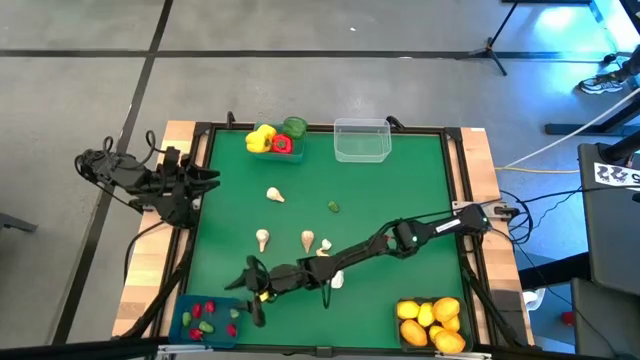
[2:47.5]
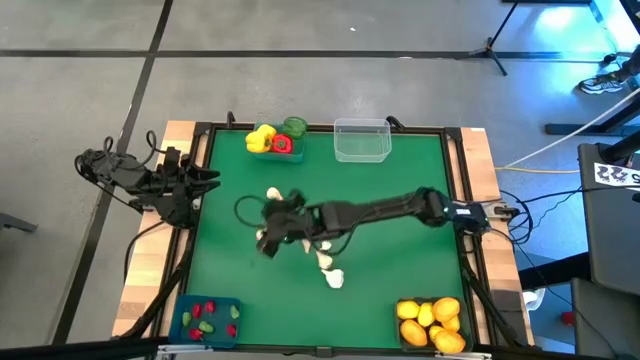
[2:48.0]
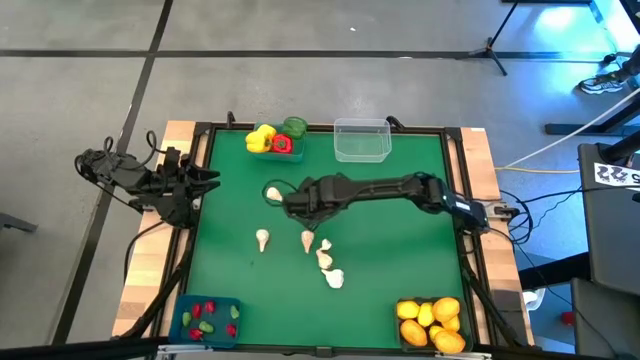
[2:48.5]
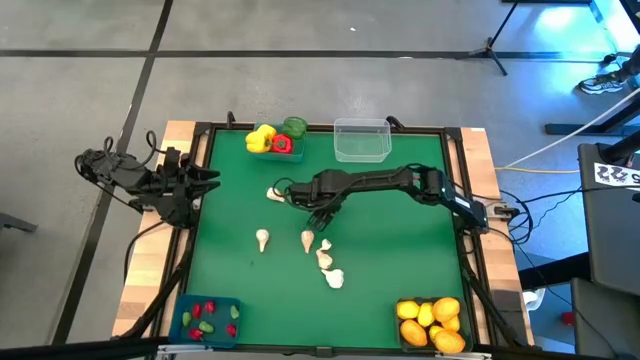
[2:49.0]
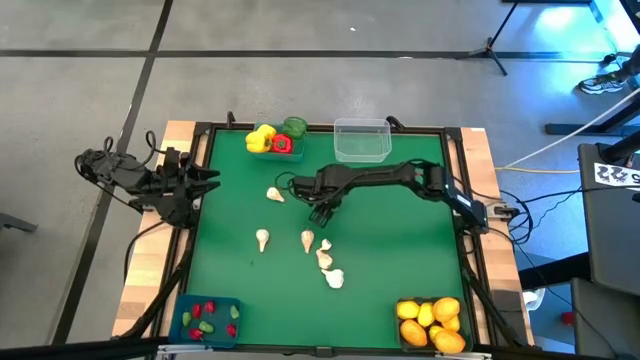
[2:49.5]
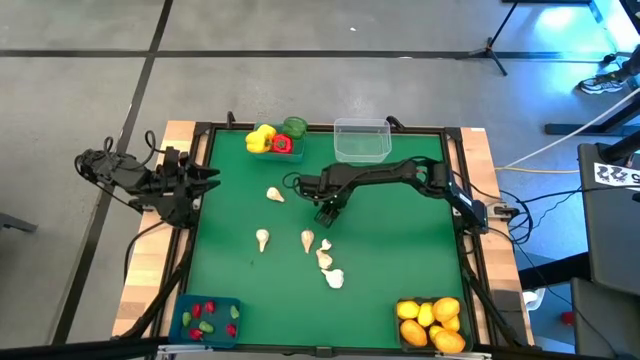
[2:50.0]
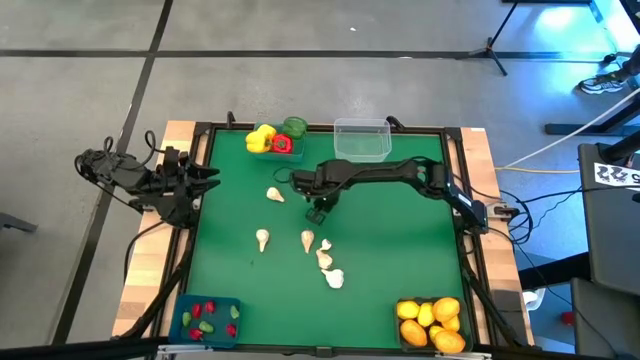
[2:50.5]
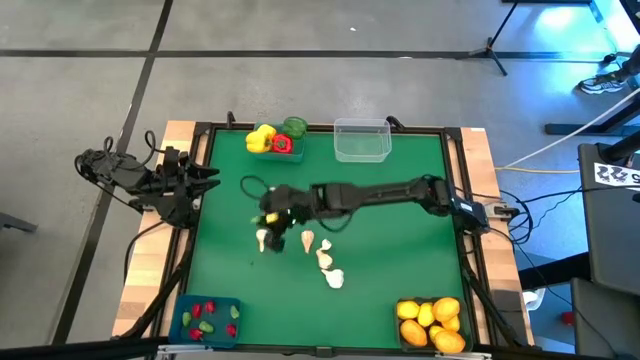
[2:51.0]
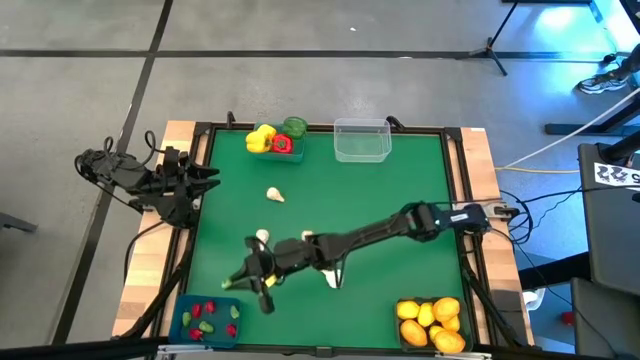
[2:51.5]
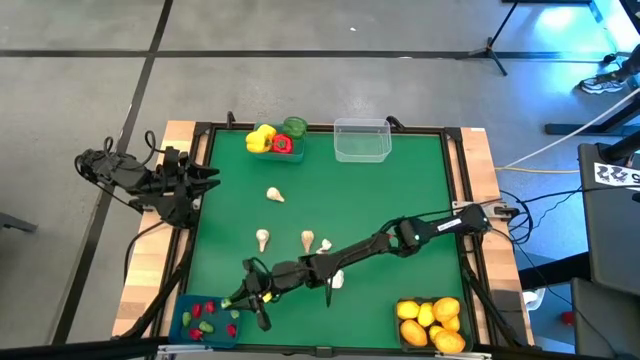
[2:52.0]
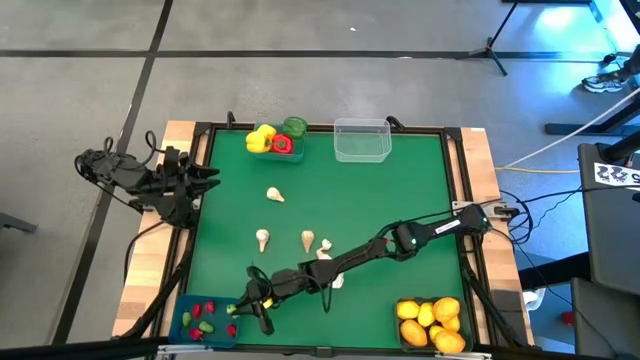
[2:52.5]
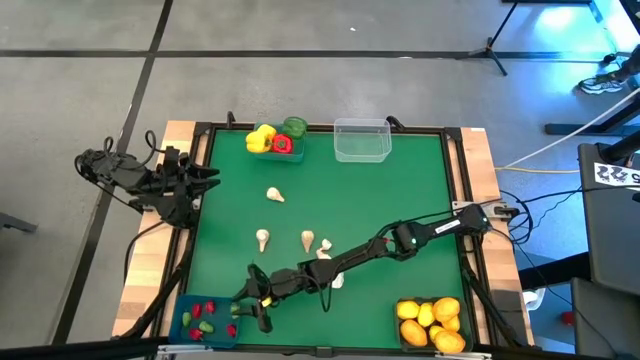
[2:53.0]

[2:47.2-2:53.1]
Task: Sort produce into baskets
Put the green chili pepper into the blue bin

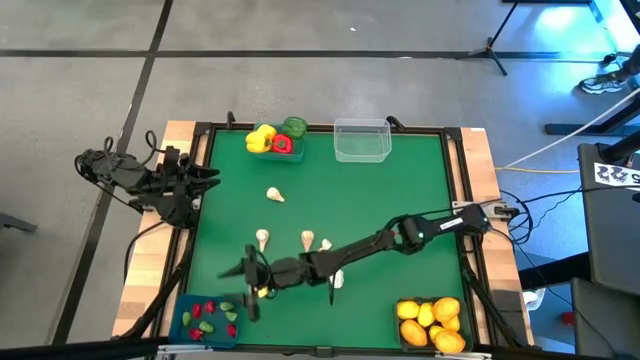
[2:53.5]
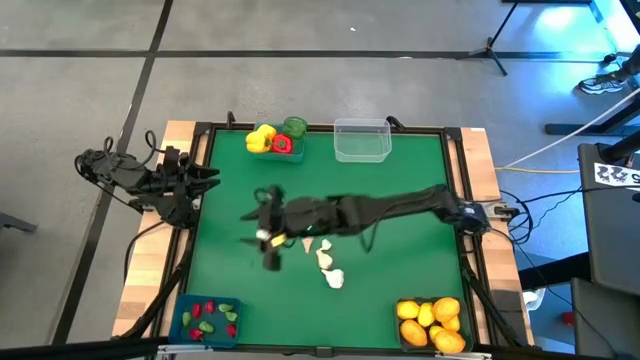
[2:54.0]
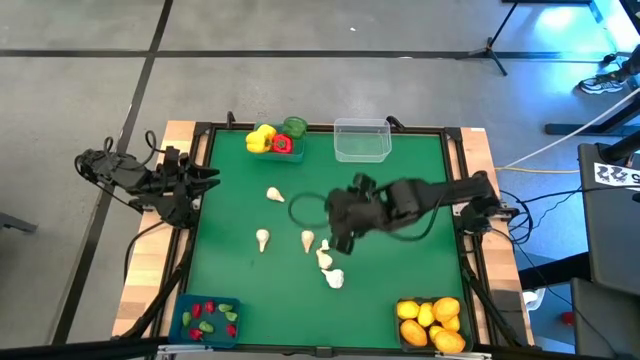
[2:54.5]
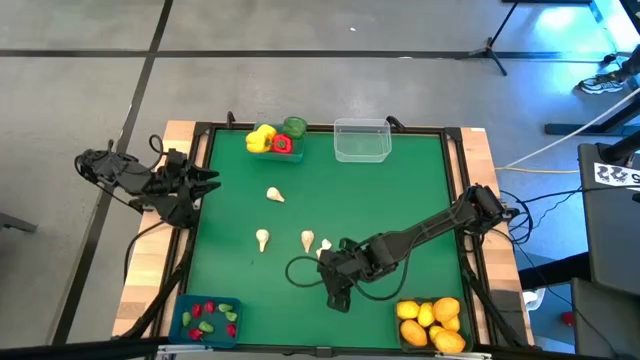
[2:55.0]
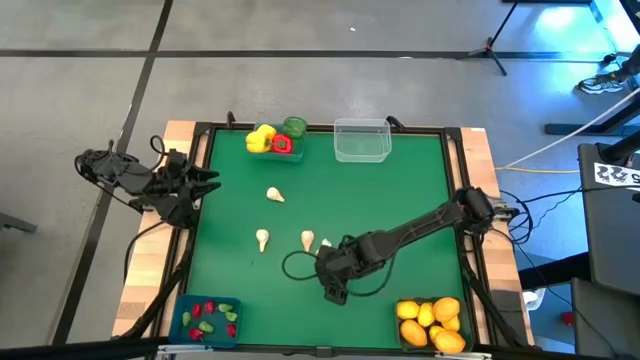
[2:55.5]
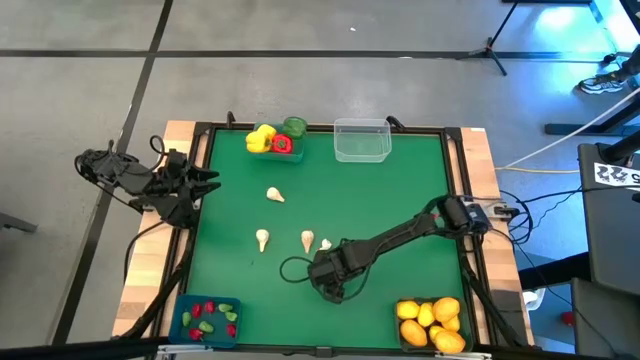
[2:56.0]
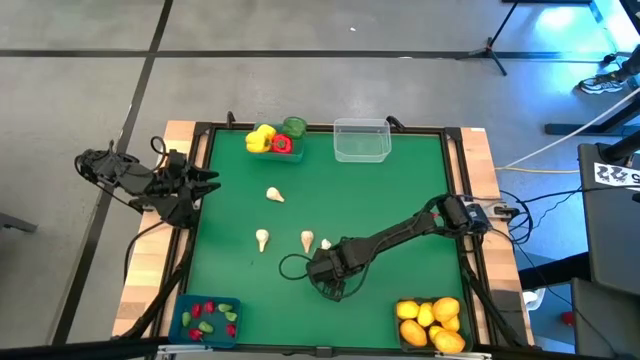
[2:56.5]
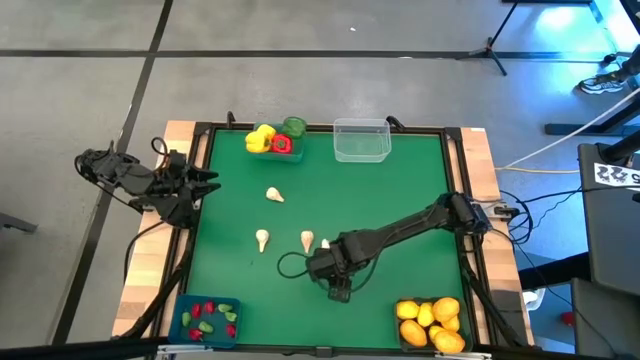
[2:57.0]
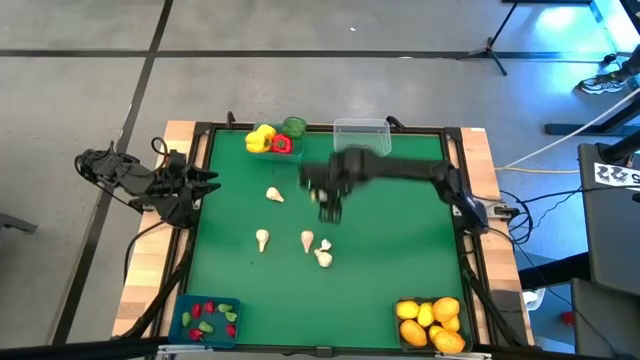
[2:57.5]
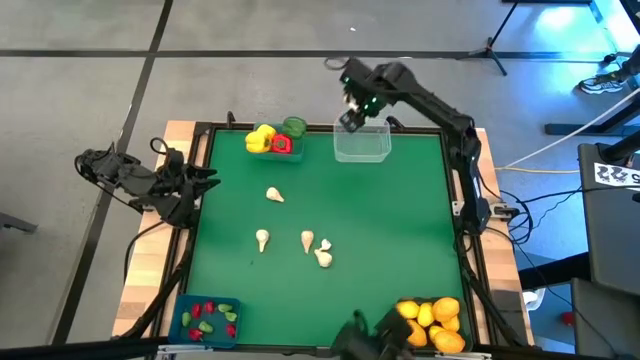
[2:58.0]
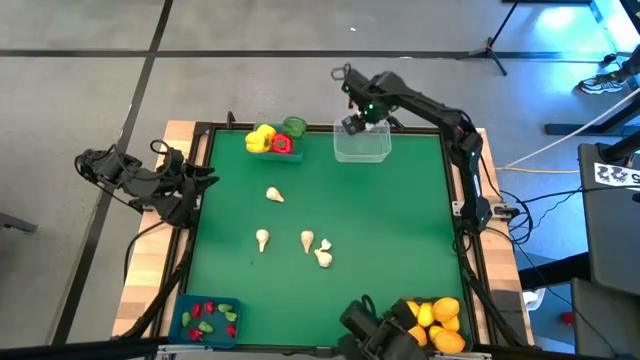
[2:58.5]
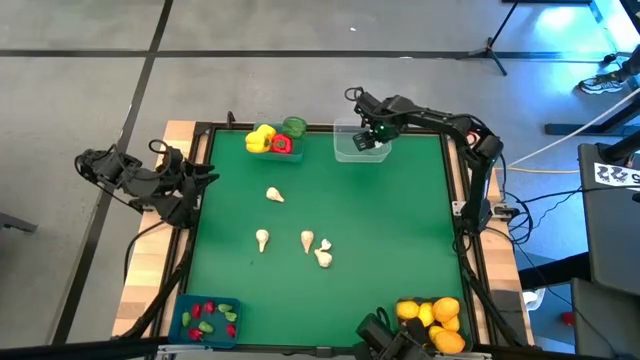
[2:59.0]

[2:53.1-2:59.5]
Put the garlic into the transparent bin

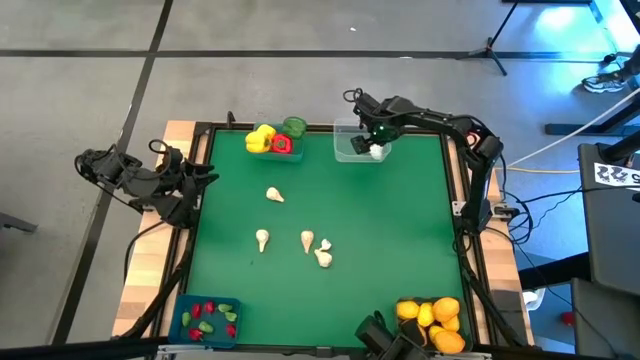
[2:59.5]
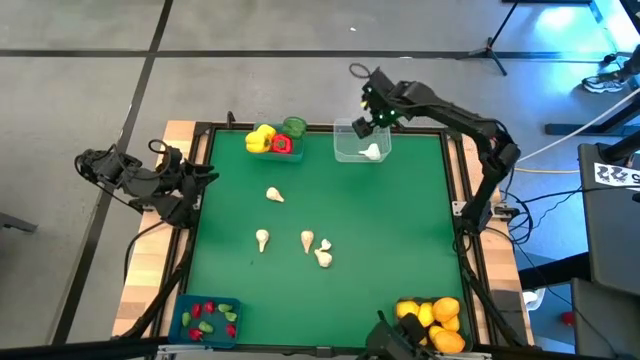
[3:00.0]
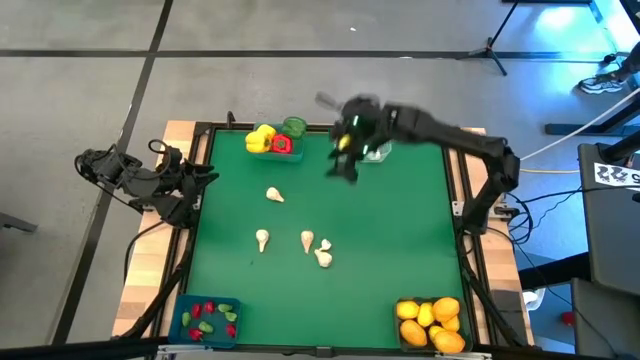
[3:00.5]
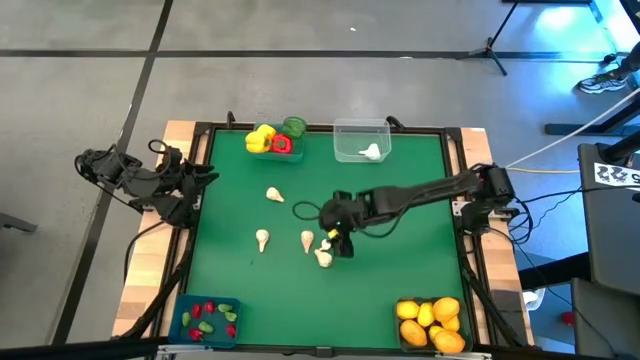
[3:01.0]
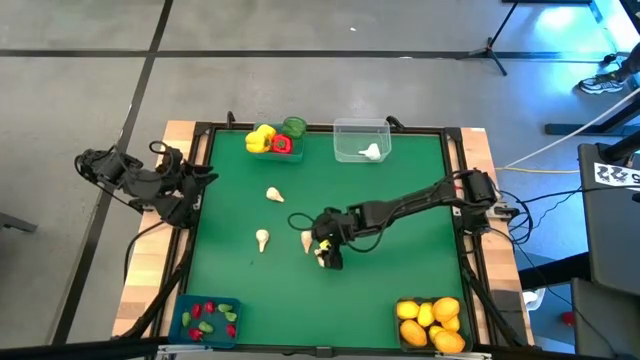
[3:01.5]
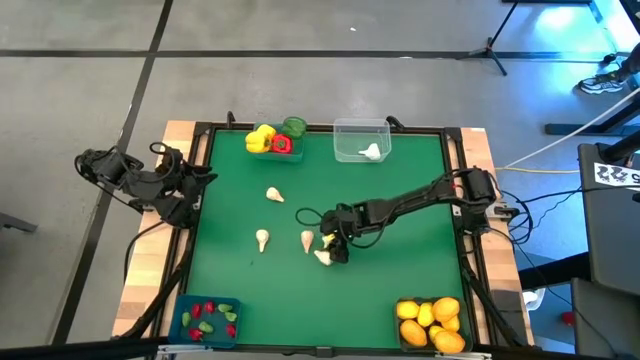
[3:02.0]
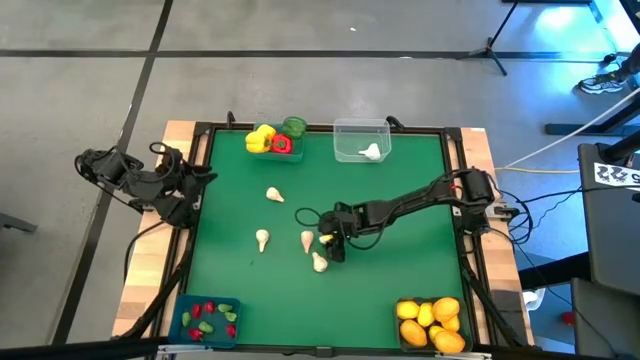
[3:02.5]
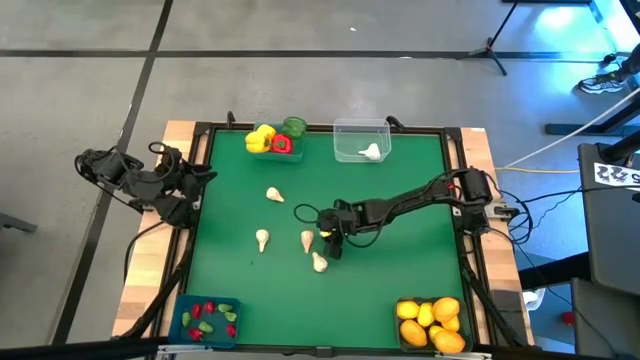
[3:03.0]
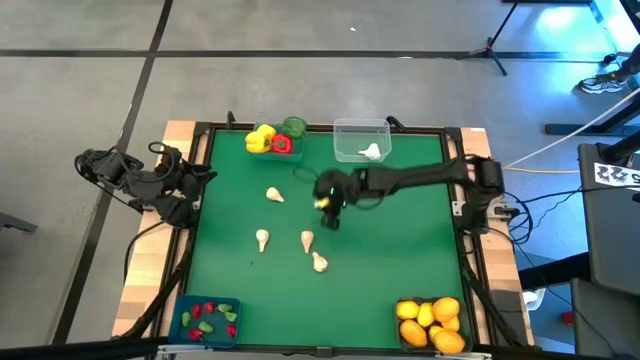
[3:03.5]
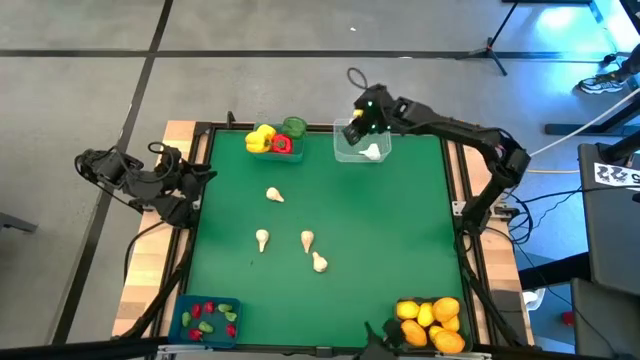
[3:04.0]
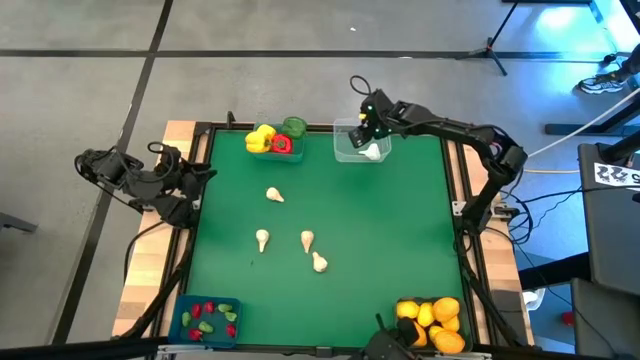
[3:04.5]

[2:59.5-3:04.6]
Put the garlic into the transparent bin

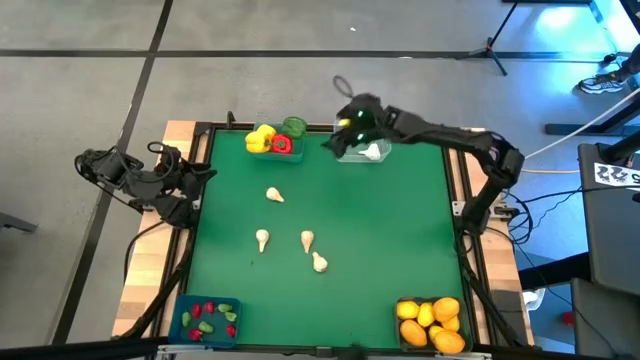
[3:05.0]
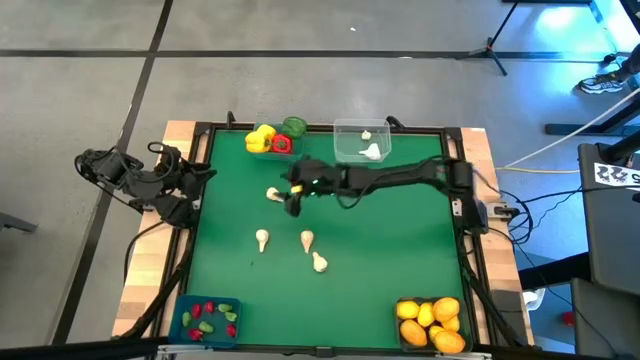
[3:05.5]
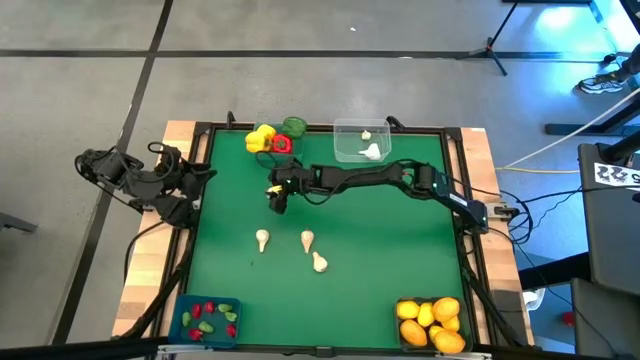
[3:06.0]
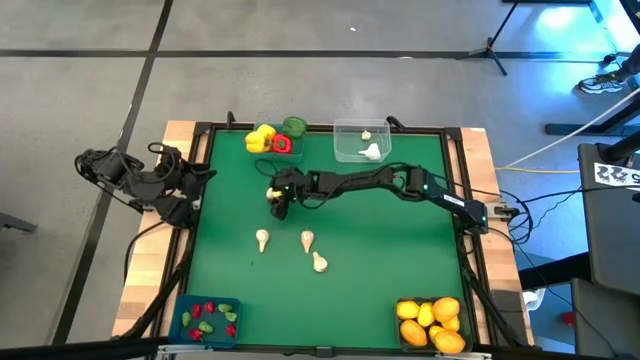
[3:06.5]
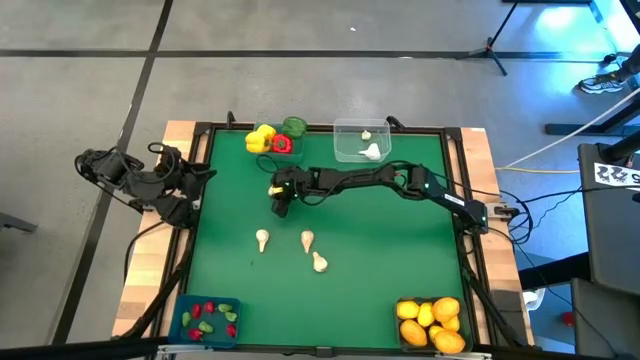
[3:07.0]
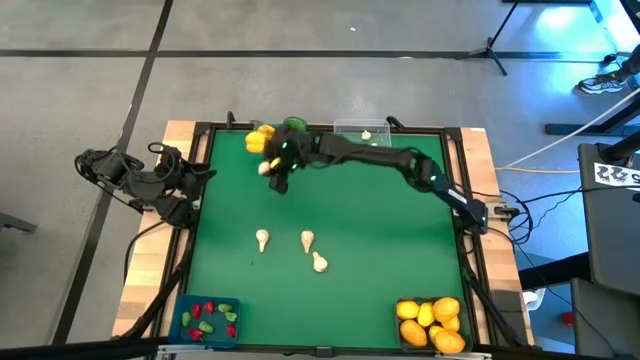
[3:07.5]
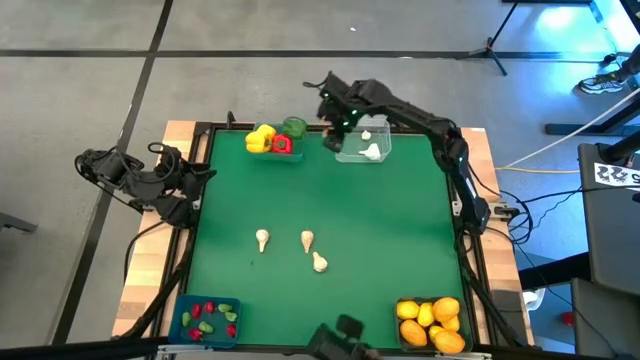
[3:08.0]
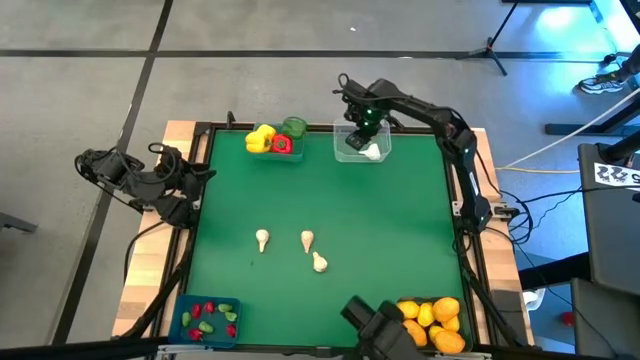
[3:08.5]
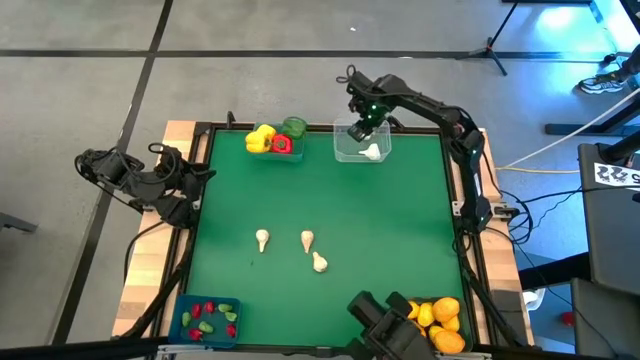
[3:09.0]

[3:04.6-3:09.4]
Put the garlic into the transparent bin
